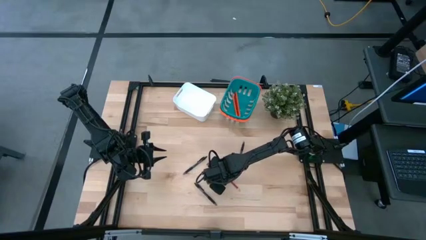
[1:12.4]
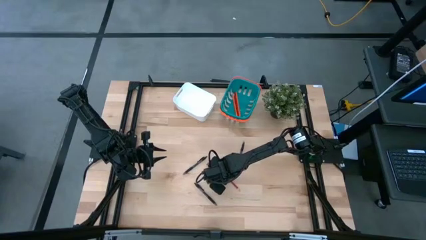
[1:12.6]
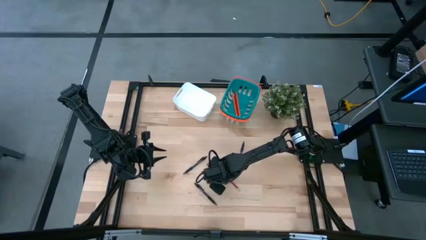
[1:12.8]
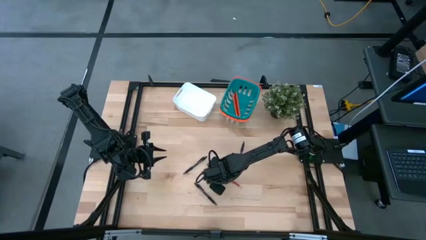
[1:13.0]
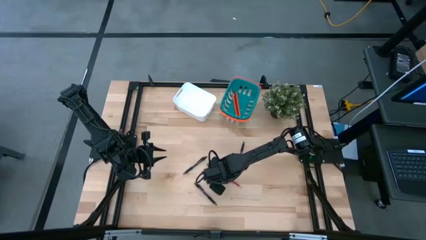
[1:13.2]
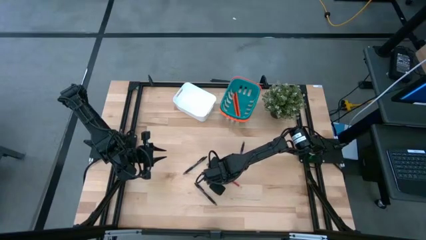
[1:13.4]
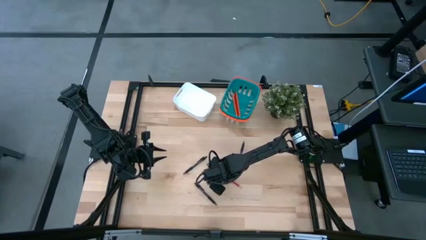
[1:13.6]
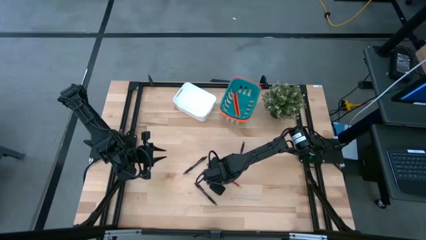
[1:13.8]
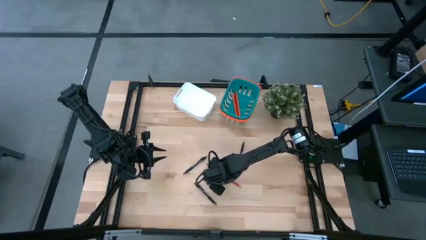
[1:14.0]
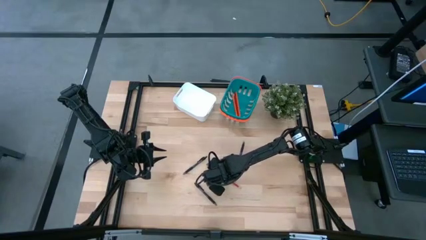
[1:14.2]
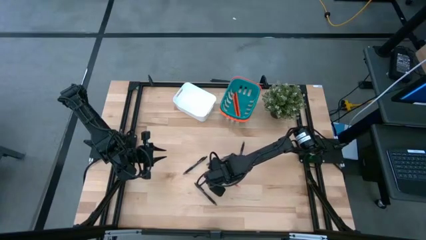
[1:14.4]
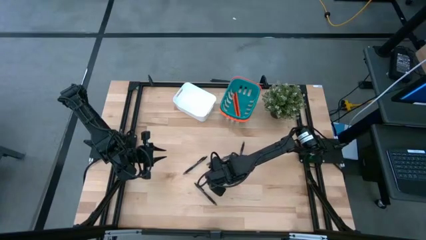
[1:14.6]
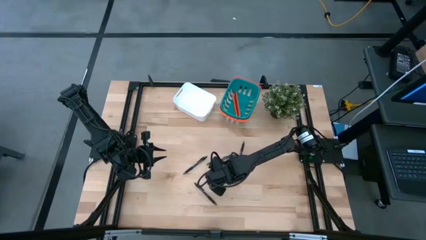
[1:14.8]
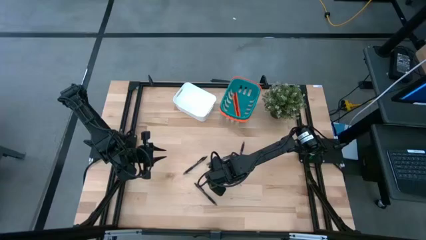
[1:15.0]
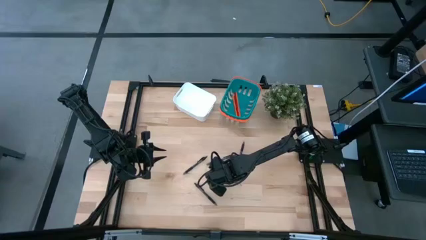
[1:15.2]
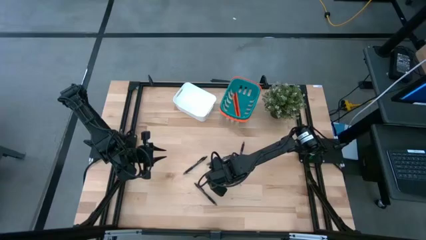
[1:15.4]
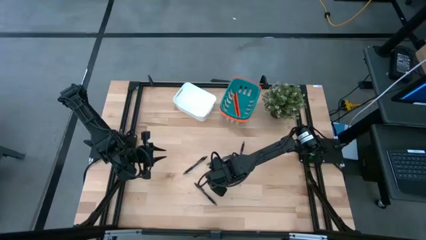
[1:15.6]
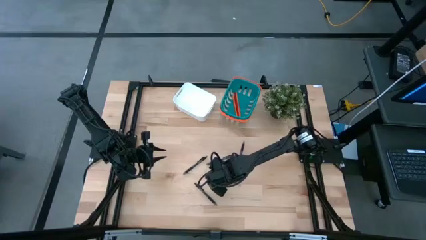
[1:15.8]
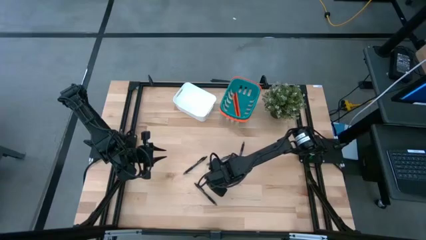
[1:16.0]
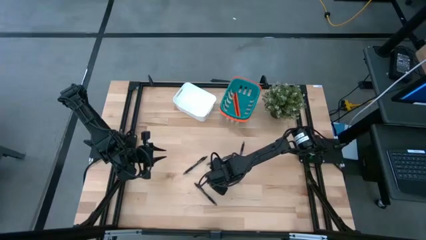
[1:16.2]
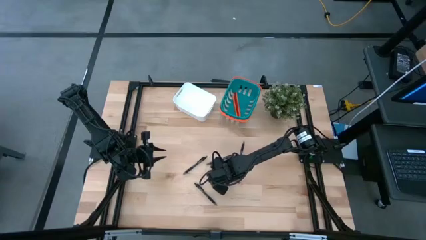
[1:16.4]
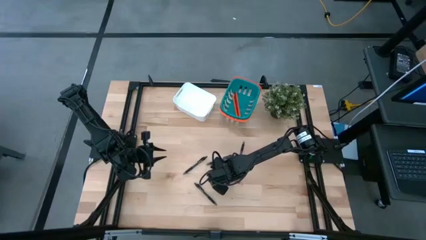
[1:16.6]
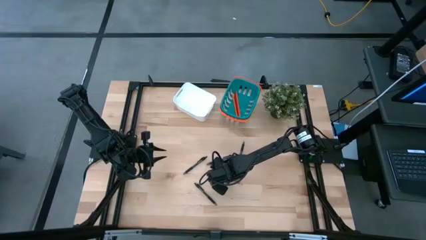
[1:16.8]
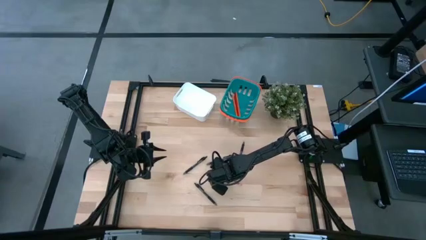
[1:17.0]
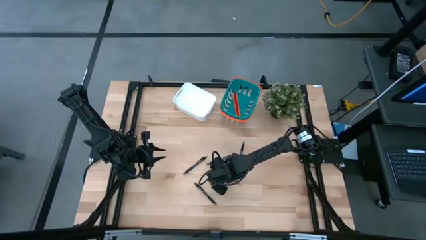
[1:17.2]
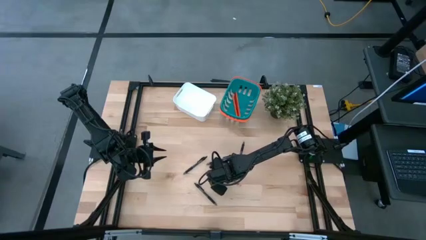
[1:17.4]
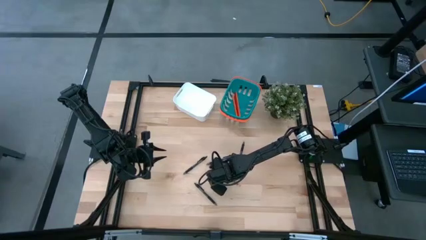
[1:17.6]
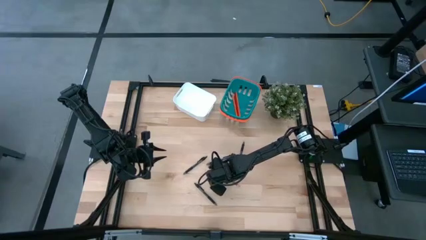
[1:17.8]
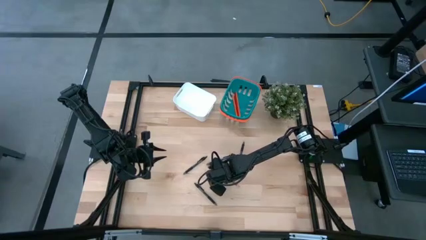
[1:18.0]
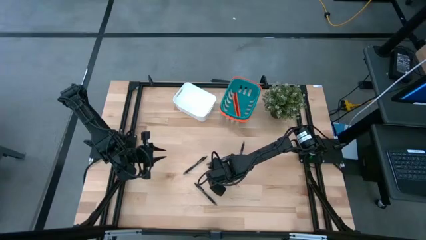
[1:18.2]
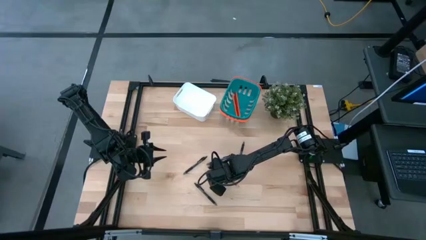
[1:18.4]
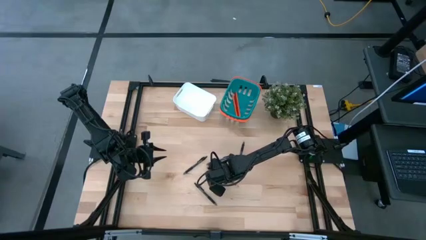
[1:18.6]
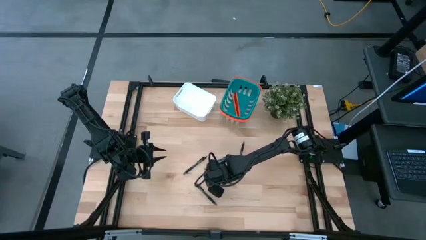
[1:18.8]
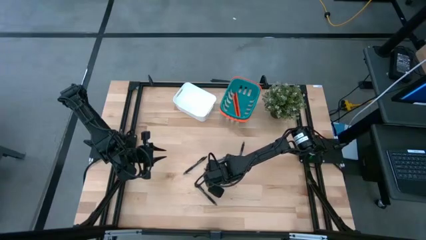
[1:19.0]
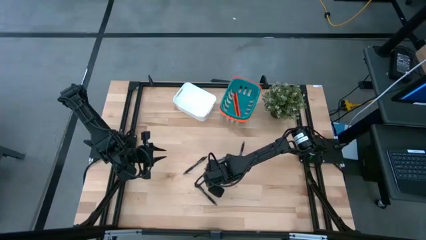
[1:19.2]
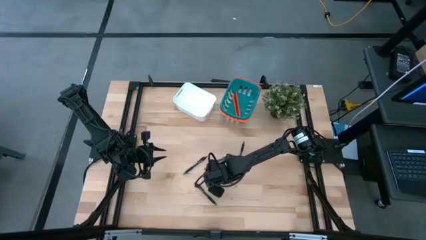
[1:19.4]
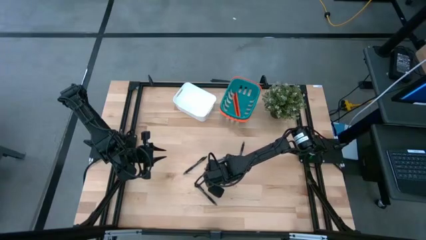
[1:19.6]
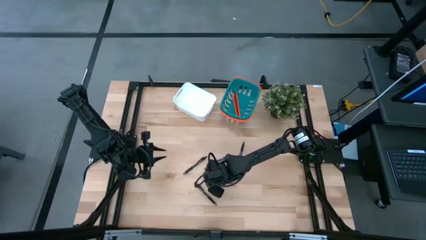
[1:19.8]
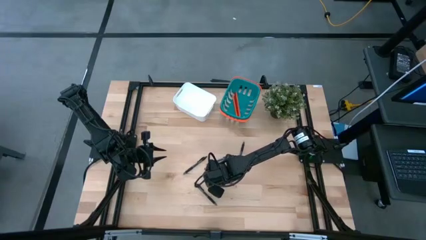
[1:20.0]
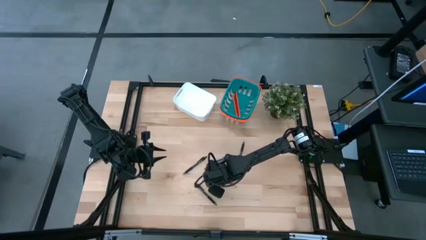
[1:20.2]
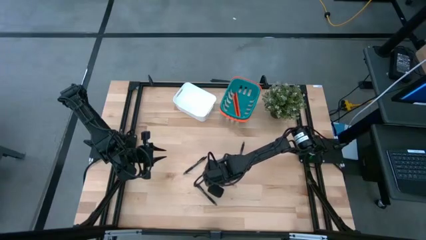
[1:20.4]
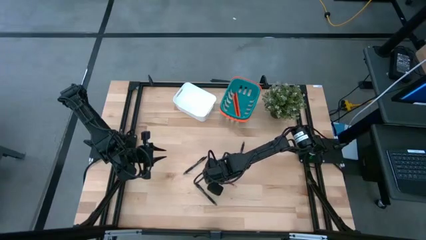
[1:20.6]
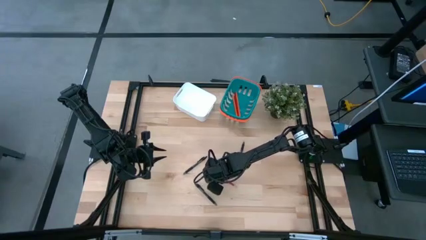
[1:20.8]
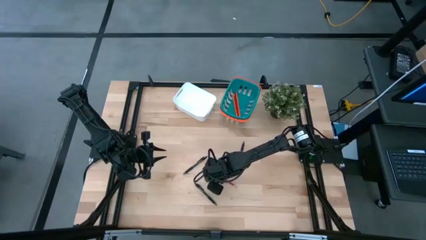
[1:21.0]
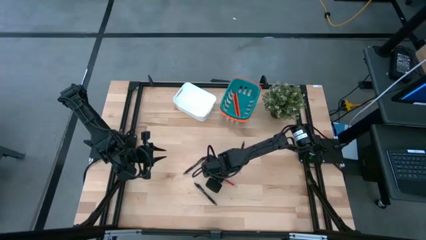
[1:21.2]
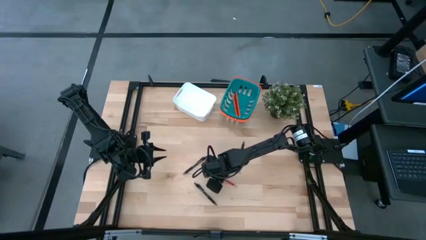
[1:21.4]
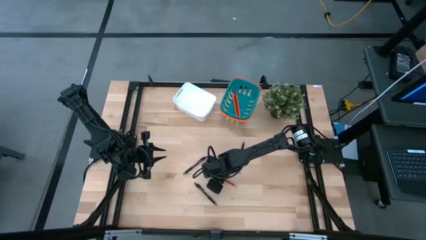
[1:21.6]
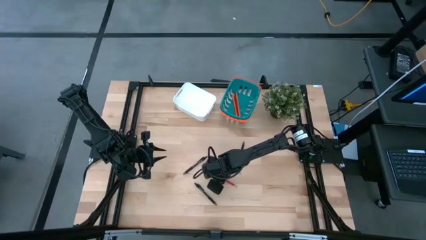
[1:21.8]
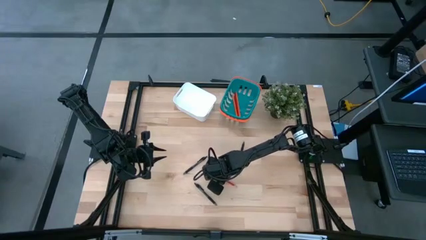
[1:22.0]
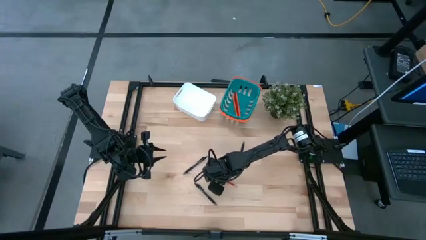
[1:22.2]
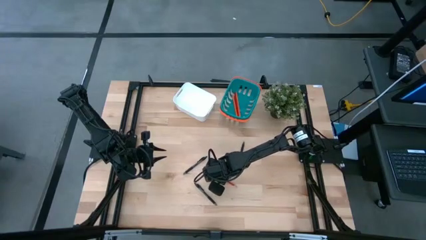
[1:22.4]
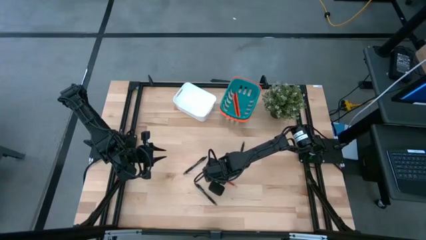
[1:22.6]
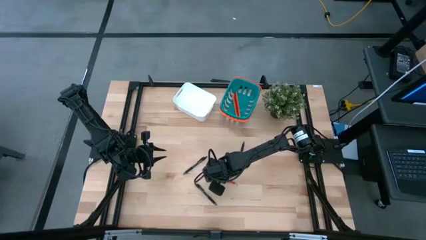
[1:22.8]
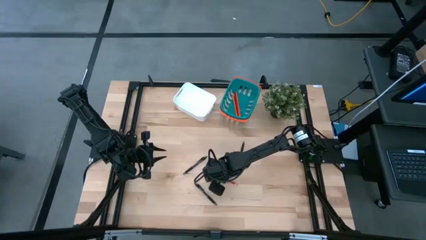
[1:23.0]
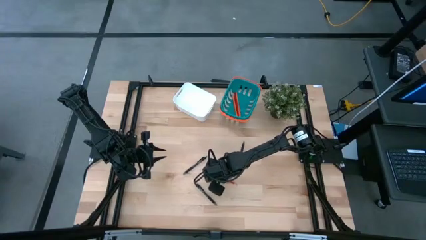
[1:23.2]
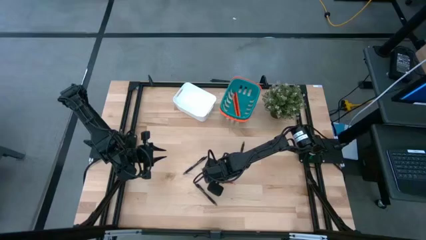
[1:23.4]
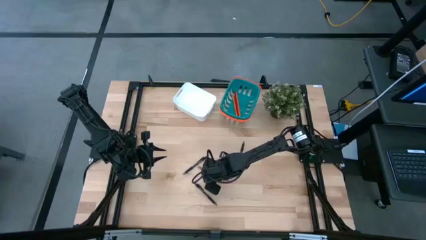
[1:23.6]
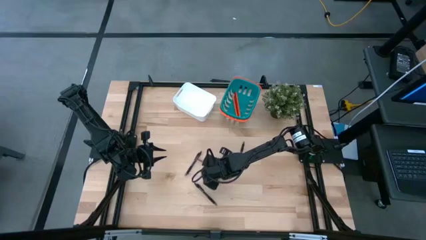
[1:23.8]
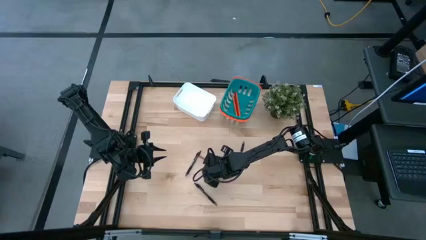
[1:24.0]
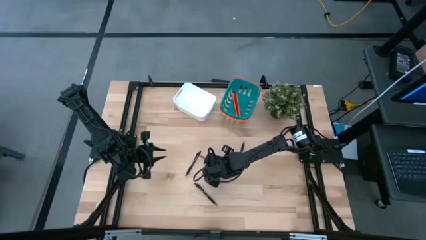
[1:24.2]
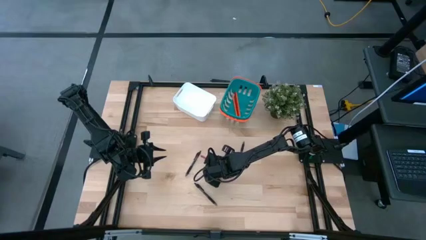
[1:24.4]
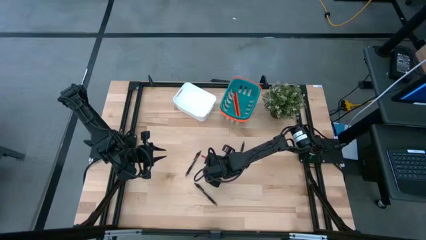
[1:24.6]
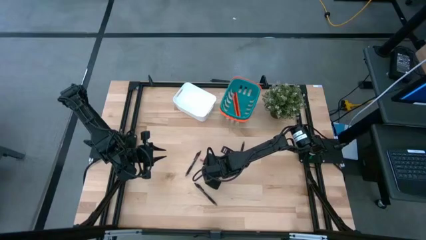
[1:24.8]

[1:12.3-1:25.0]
Task: Sort pens & pencils
Put the red pencil into the green basket

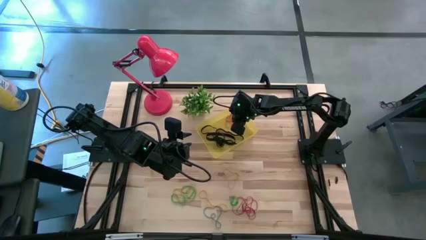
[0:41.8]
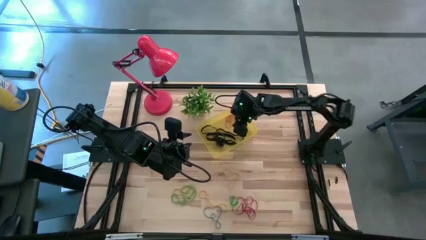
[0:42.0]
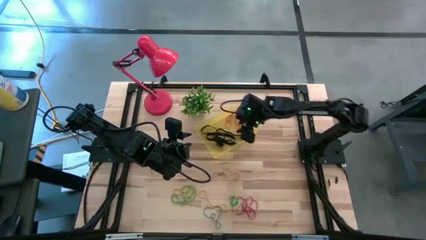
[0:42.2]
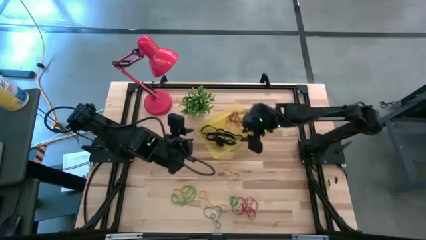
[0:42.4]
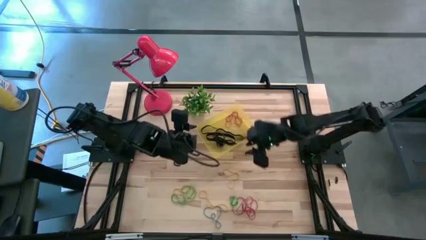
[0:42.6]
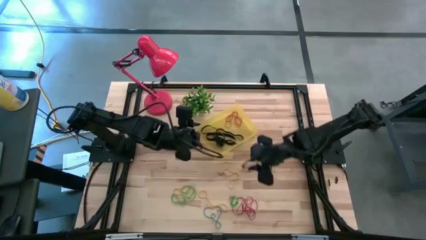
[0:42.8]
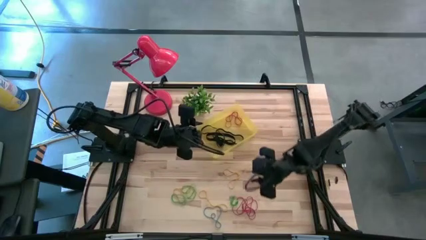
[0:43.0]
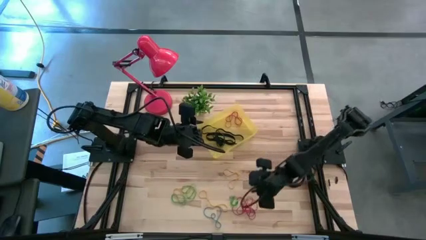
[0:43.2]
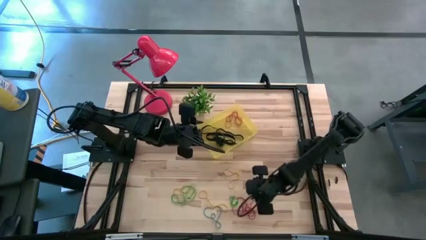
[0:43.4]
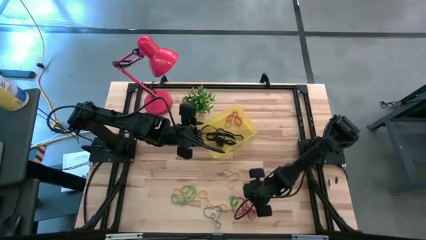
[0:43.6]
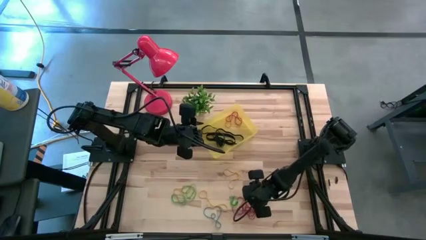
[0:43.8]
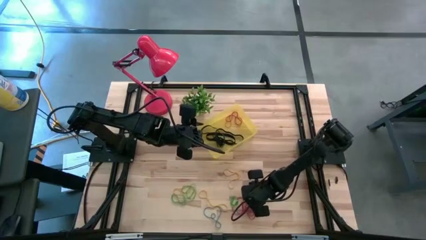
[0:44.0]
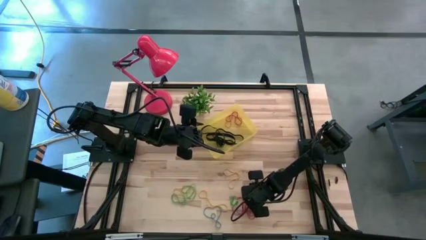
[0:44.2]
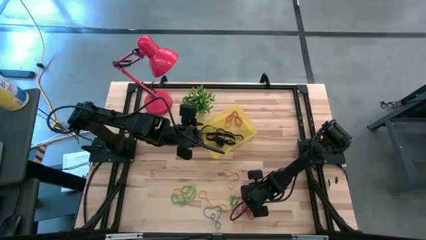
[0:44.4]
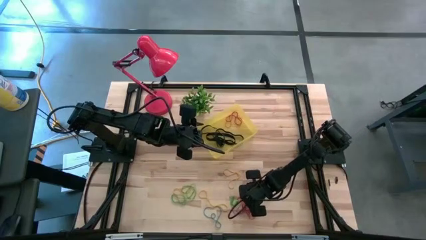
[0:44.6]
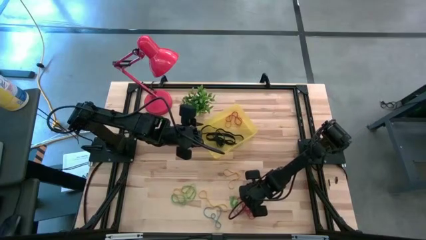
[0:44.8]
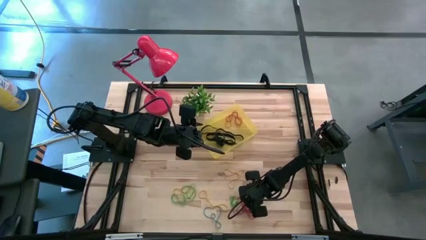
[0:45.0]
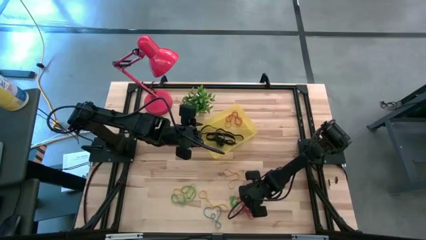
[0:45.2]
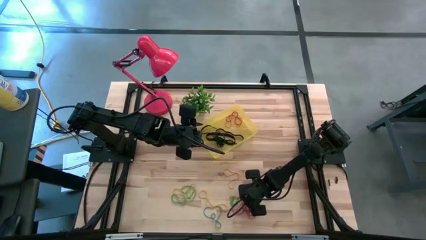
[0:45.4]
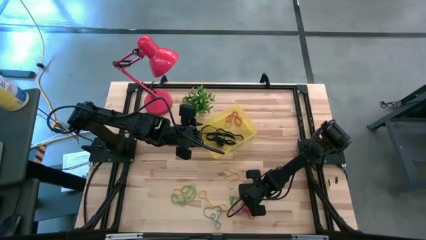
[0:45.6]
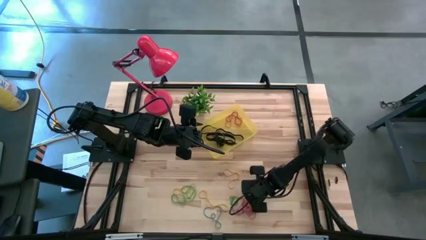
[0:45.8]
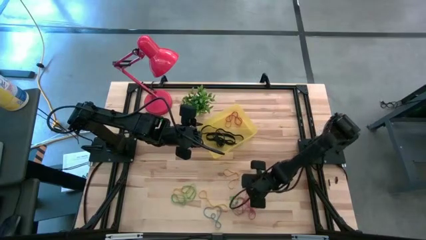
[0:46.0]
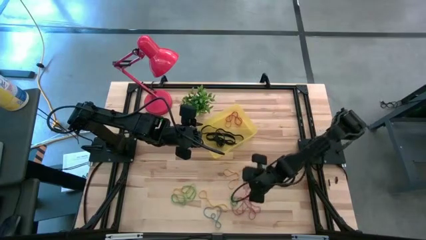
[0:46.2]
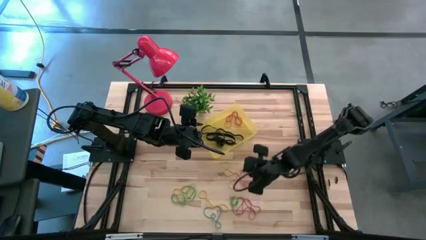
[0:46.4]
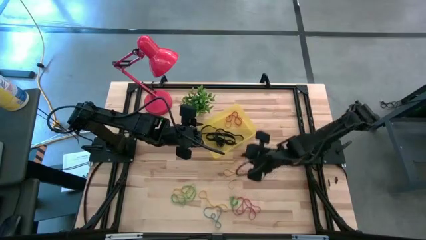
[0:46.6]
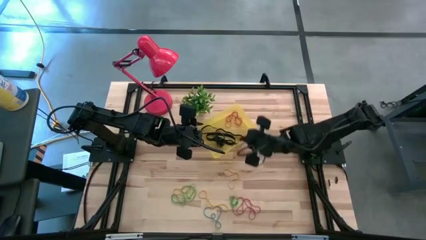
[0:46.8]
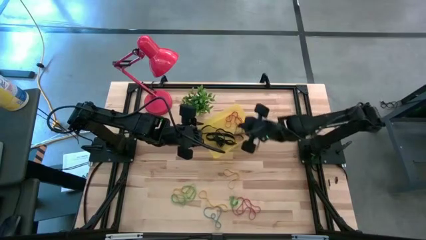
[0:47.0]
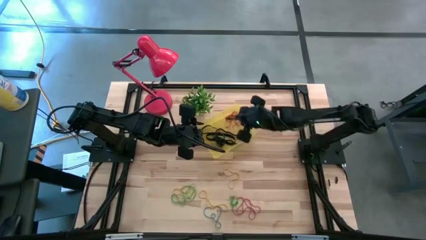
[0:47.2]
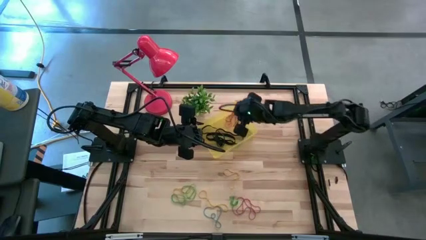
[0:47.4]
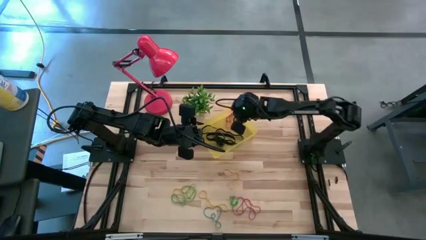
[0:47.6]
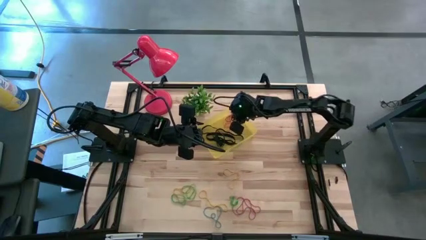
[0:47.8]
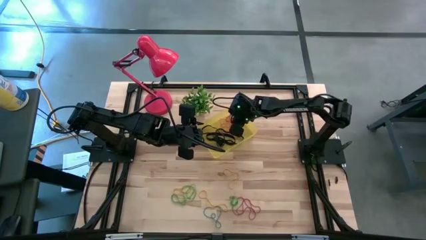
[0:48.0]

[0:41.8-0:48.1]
Task: Pick and place rubber bands into bin
Put the red rubber band into the transparent yellow bin
